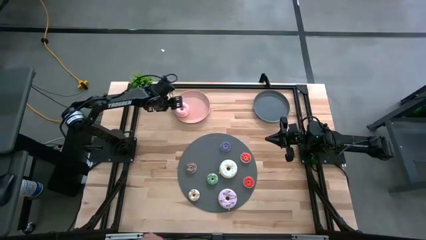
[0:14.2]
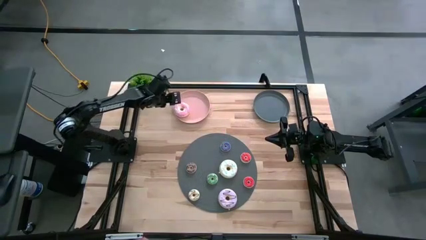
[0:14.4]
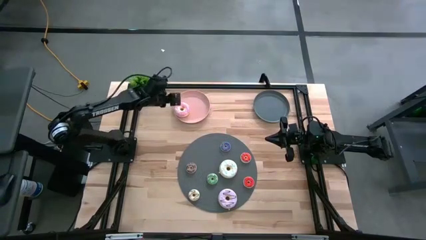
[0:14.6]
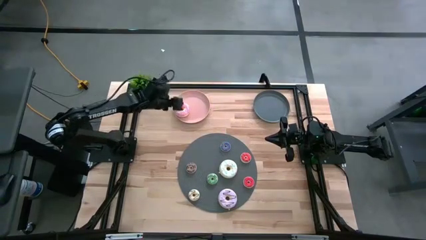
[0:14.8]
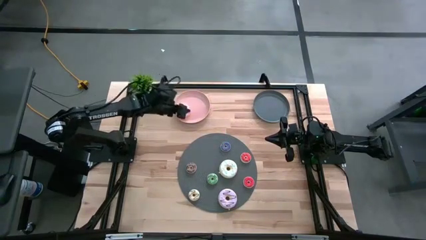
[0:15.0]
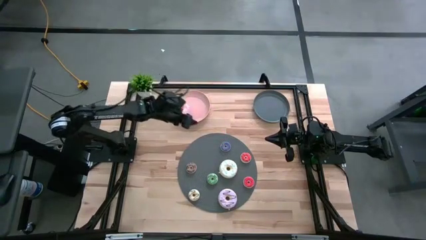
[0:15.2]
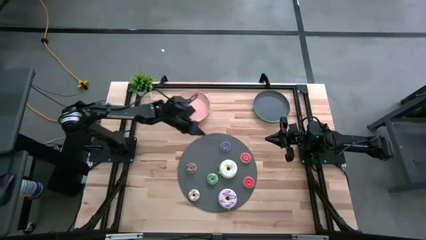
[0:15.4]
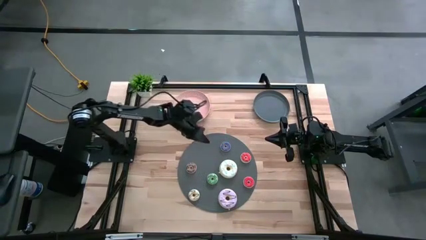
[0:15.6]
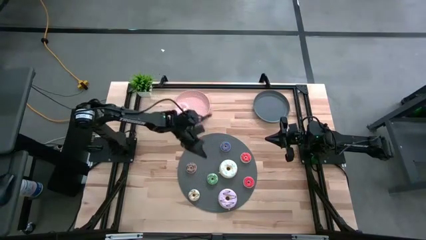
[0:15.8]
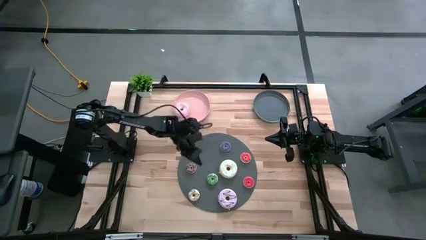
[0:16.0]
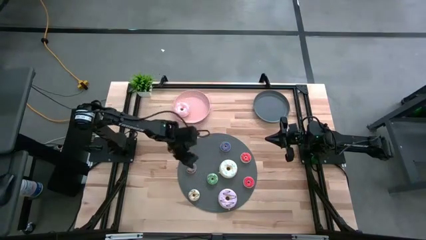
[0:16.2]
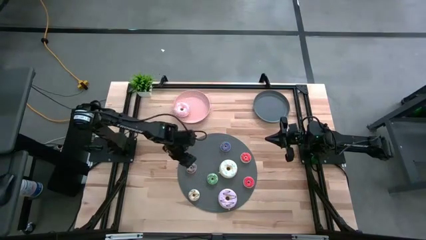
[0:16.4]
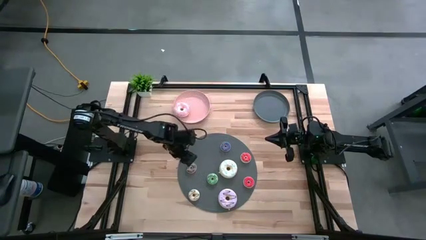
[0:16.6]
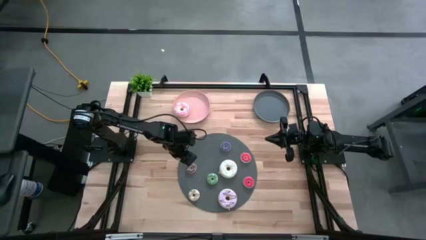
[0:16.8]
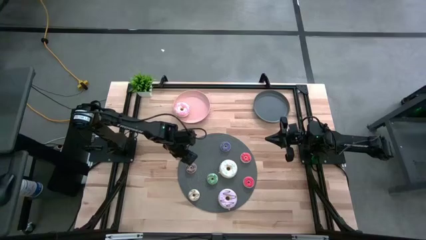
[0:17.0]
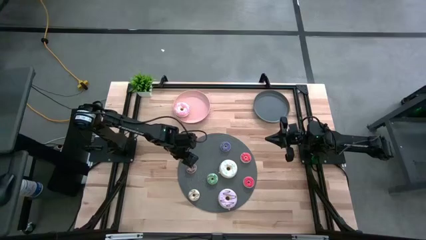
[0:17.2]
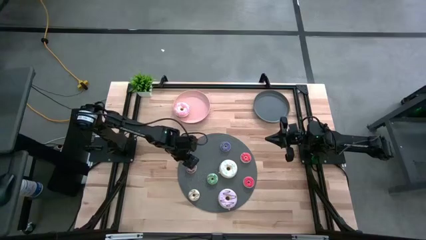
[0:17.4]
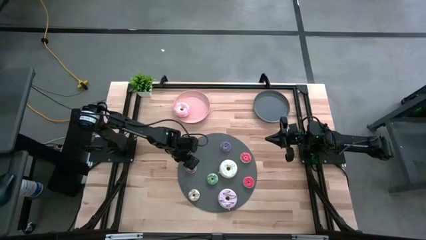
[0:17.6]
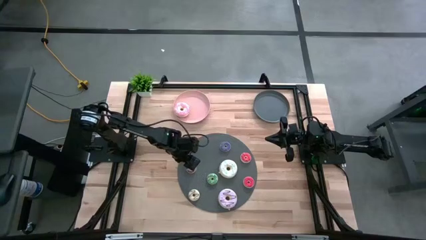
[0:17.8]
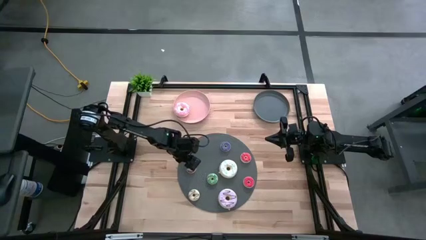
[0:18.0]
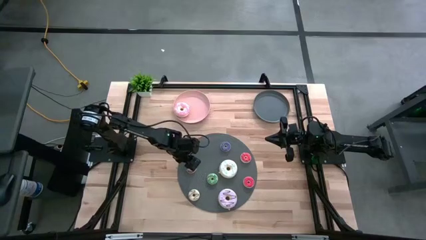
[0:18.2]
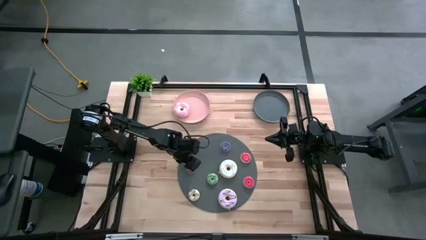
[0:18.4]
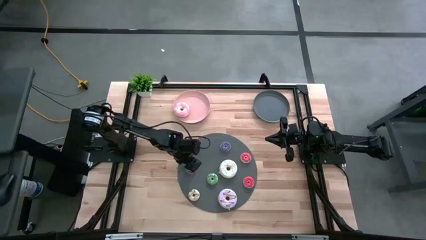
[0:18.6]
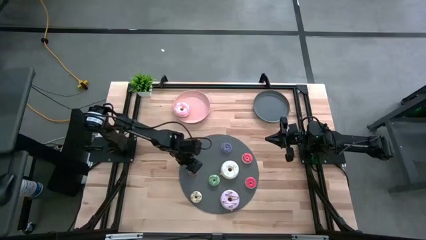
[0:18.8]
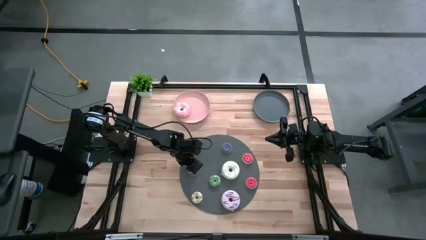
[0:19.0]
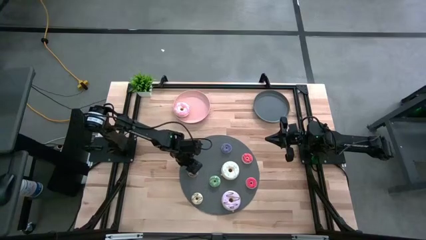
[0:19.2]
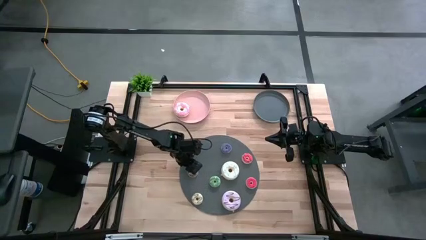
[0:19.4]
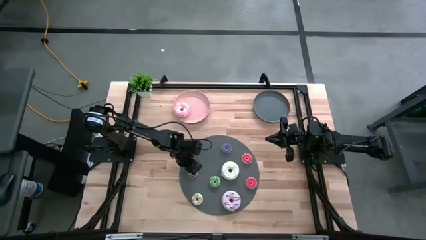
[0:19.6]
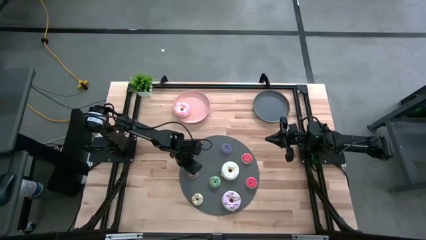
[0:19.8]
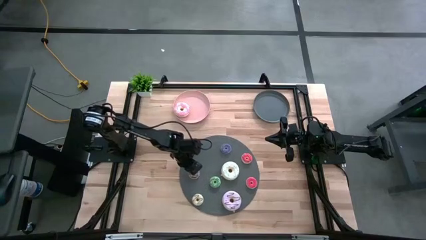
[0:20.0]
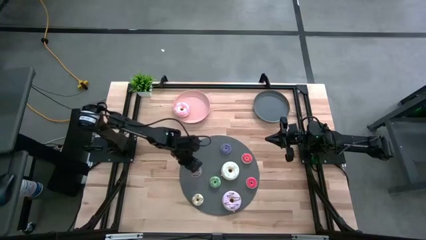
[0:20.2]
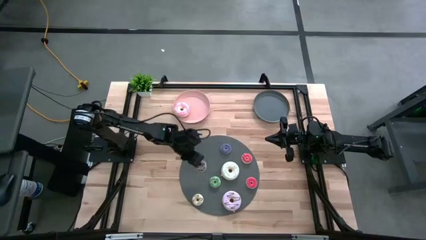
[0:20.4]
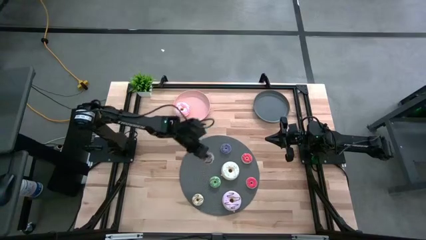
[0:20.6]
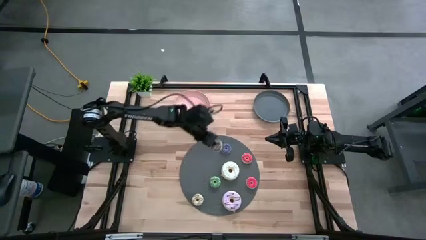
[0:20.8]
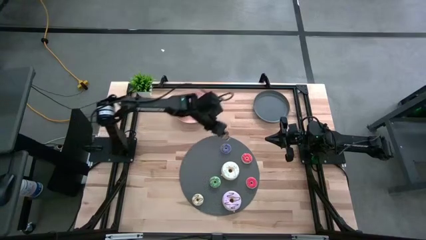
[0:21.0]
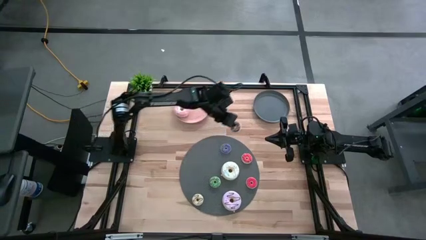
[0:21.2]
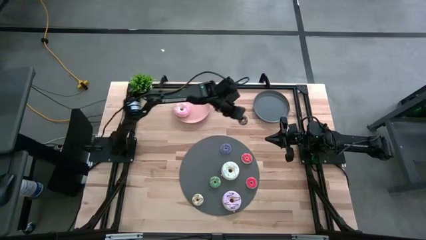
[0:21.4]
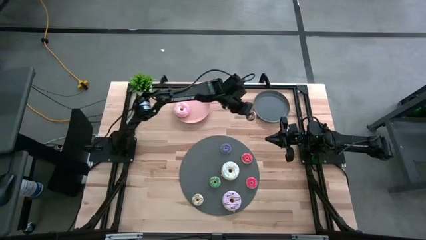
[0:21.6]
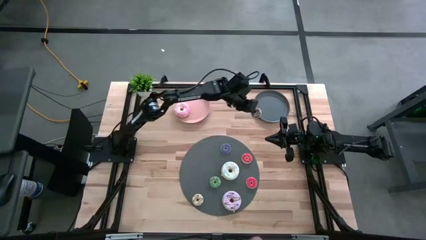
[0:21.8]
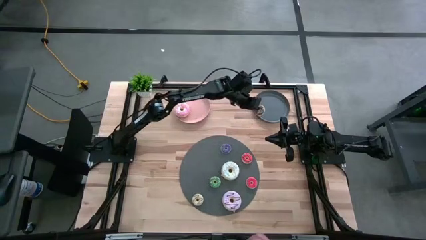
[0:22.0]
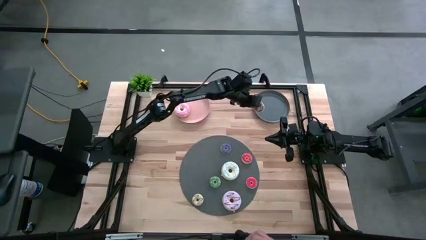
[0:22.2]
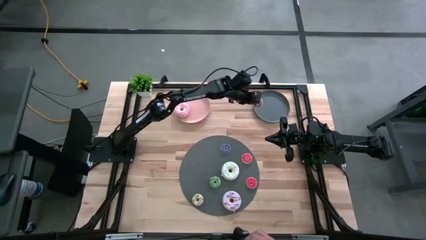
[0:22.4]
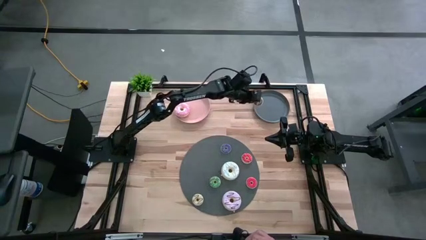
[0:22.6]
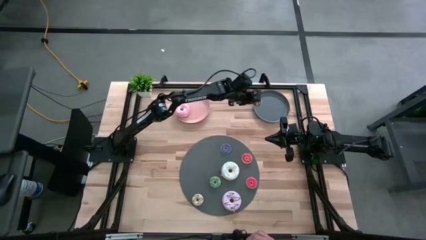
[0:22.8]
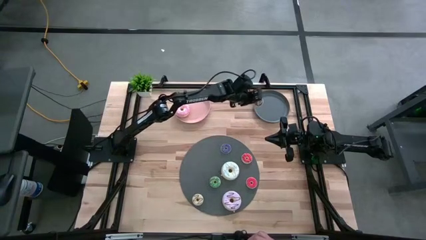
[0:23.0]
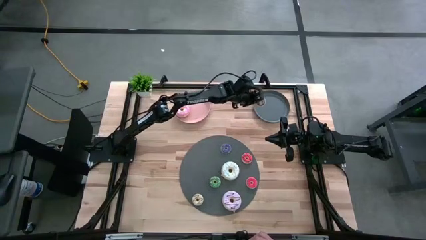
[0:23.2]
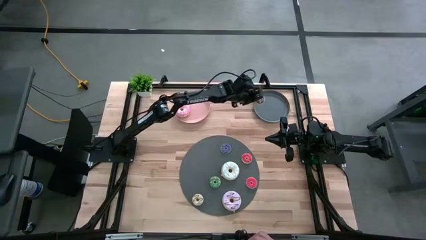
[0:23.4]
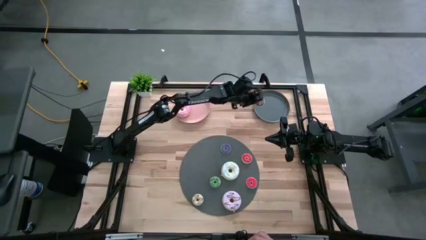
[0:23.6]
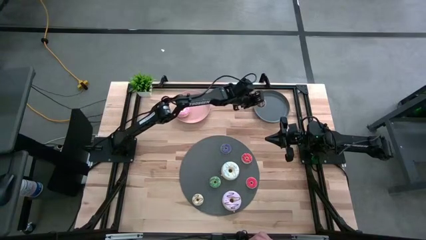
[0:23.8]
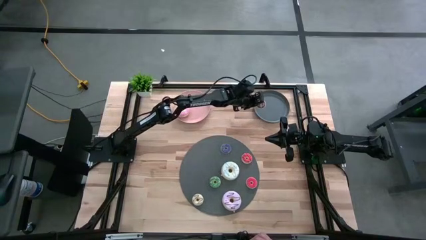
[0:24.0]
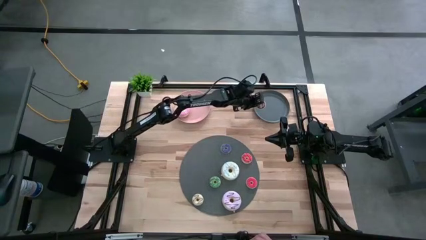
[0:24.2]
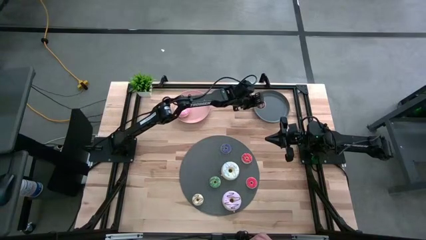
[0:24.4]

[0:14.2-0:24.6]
Task: Pick & Place donuts
Put the small brown donut on the gray plate

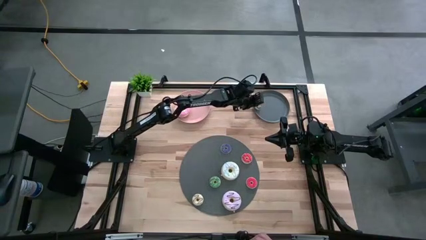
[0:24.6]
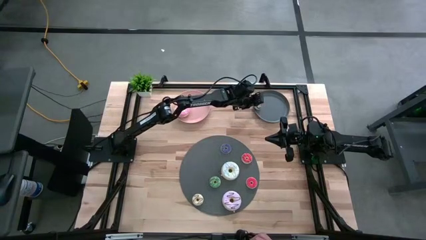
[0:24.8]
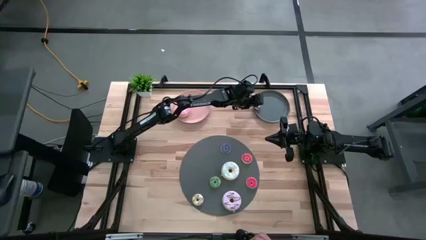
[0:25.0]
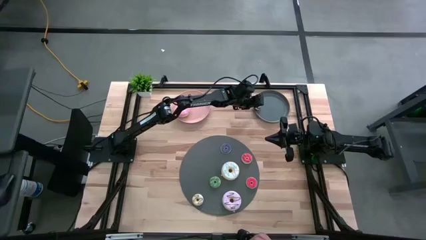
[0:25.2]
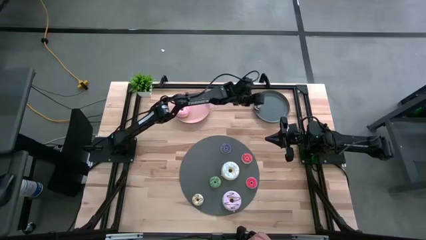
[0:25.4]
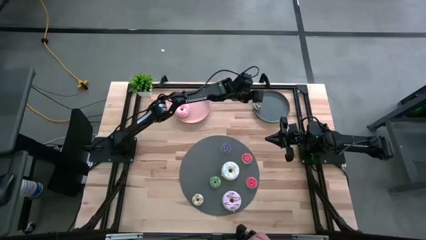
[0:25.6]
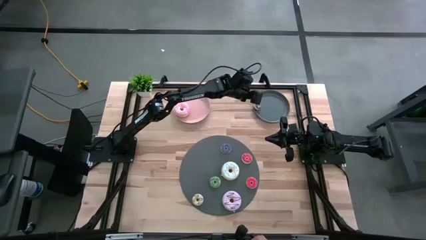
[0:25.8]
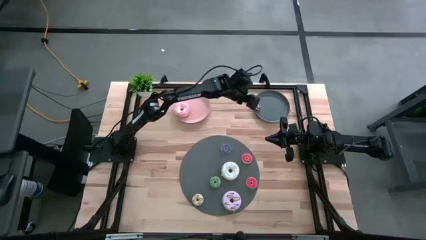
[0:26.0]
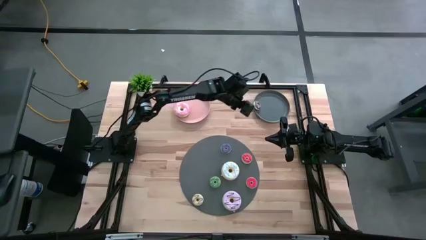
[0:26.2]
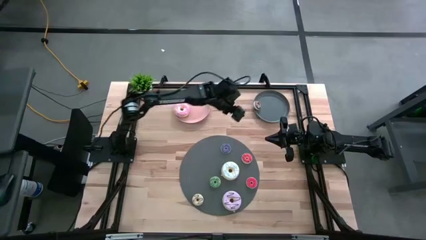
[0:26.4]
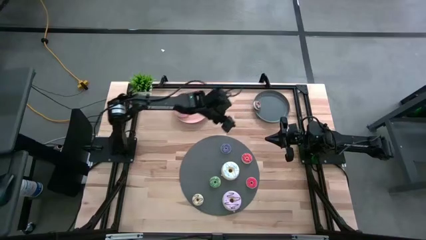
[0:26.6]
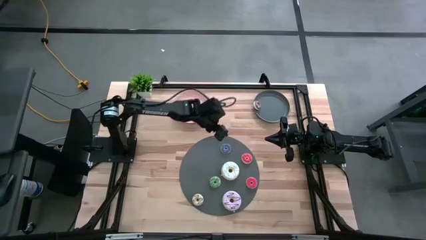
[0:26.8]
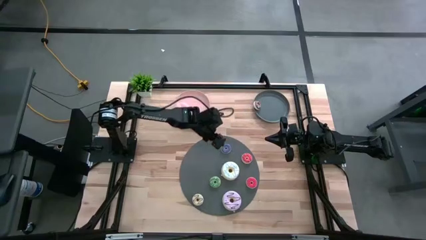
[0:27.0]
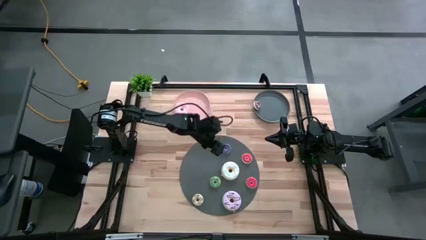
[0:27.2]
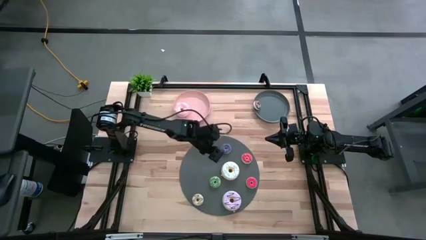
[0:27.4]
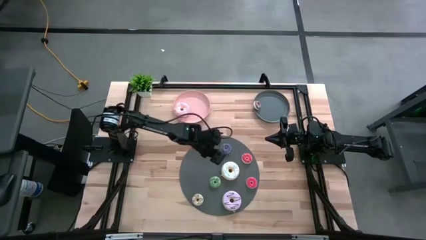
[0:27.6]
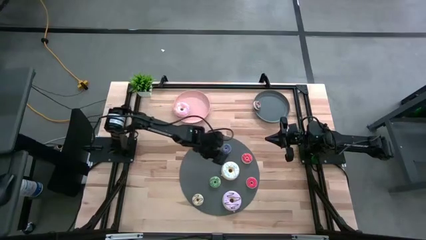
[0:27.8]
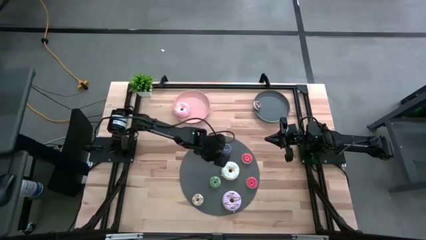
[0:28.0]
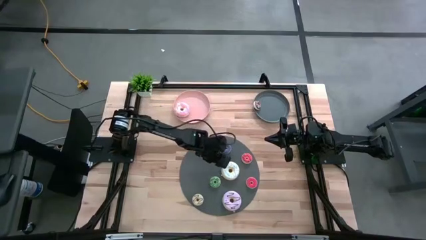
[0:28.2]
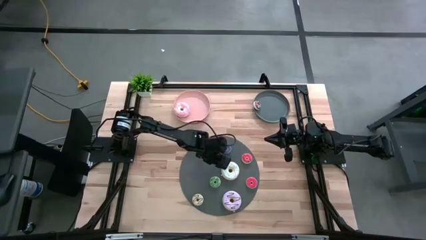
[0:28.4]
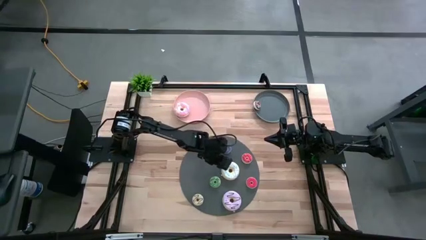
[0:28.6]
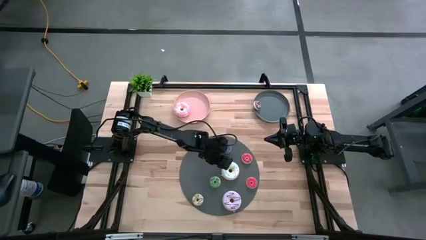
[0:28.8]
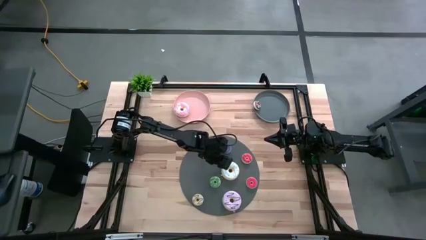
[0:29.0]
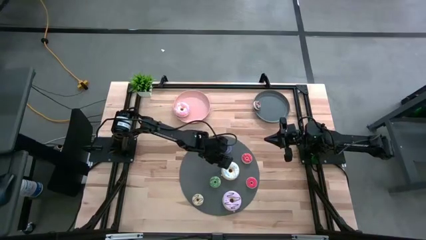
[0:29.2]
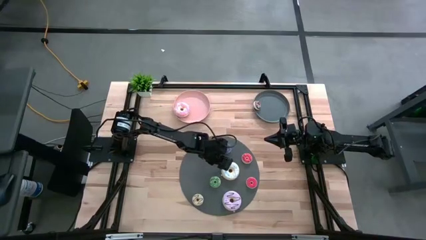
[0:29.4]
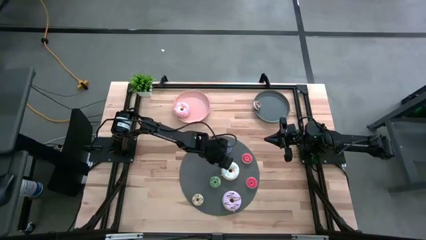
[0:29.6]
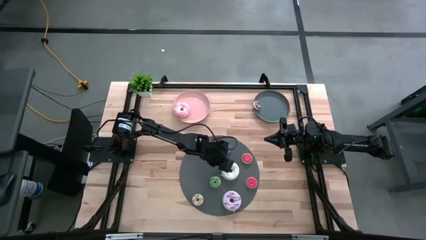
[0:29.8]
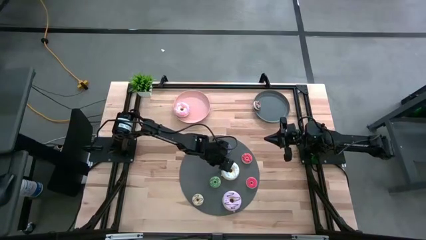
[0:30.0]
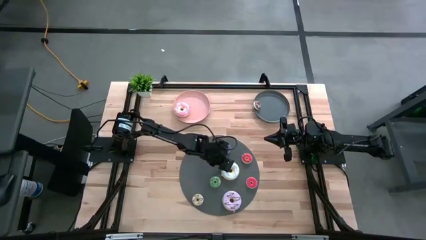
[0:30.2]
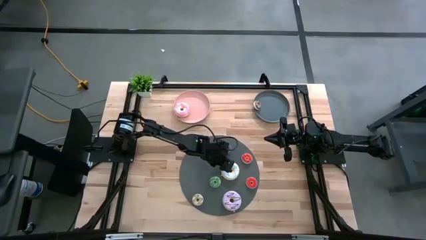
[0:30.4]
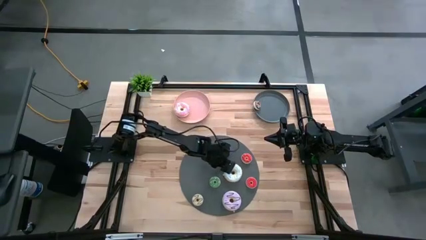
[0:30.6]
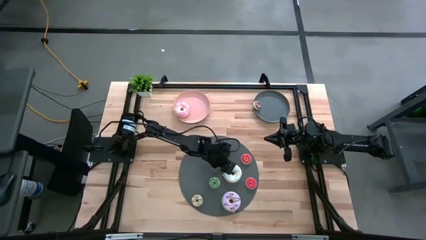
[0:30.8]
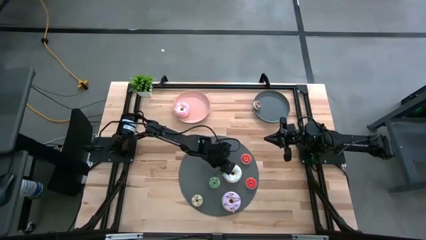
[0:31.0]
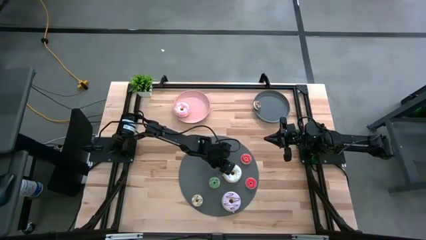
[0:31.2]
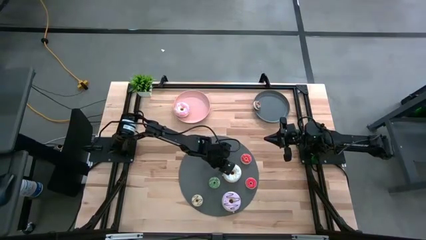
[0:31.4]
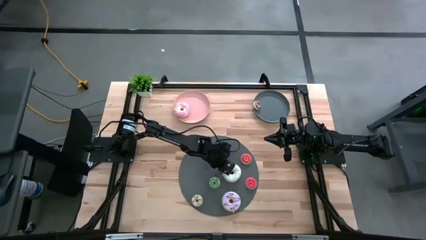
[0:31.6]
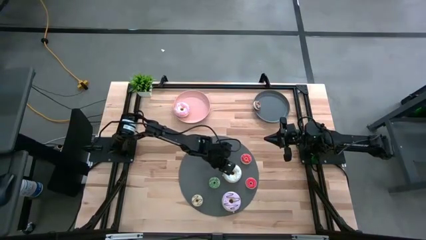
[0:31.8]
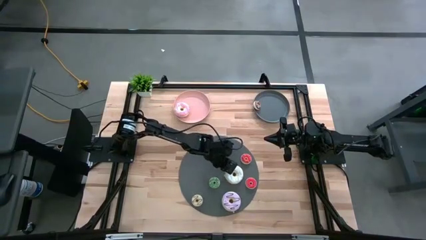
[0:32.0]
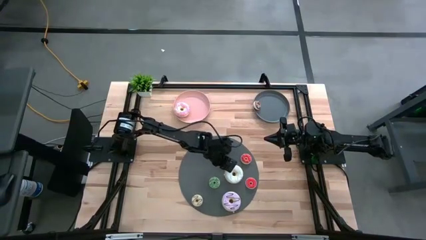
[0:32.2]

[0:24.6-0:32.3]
Put the large white donut on the pink plate
